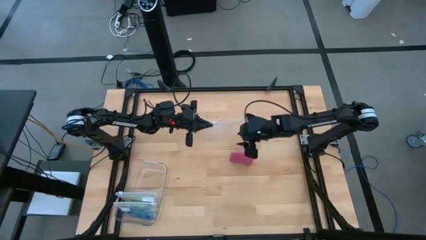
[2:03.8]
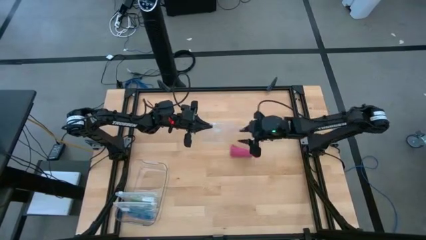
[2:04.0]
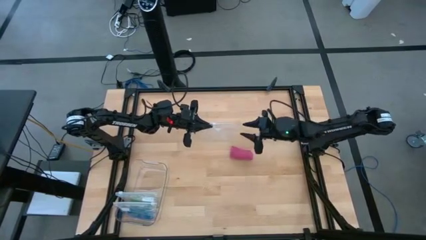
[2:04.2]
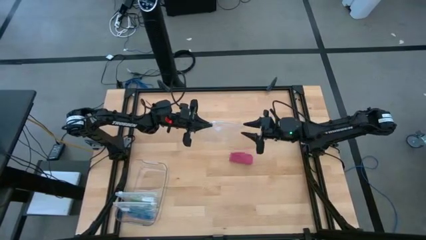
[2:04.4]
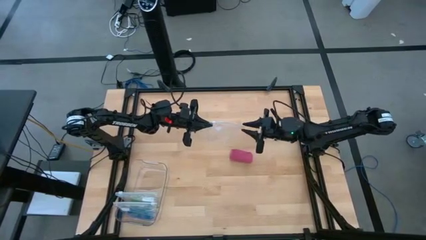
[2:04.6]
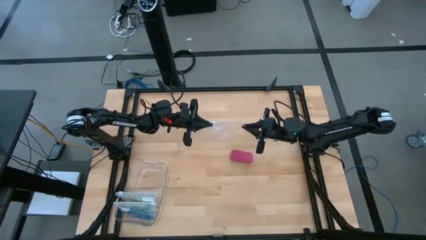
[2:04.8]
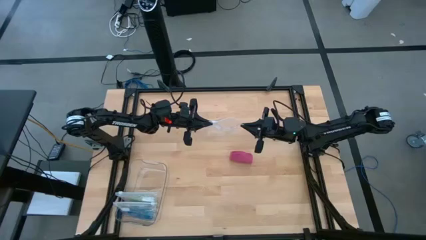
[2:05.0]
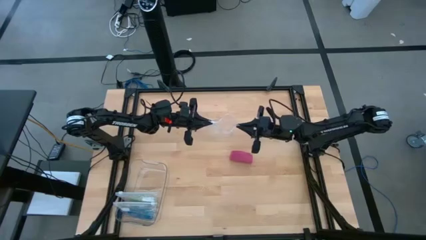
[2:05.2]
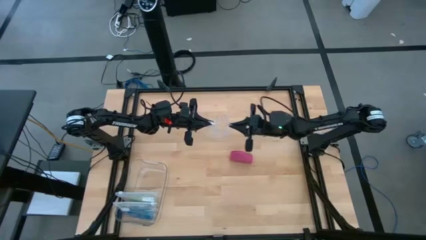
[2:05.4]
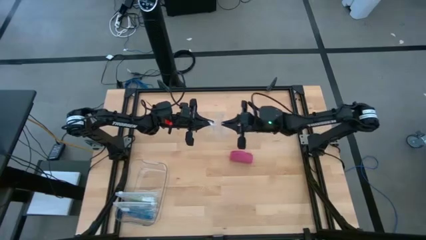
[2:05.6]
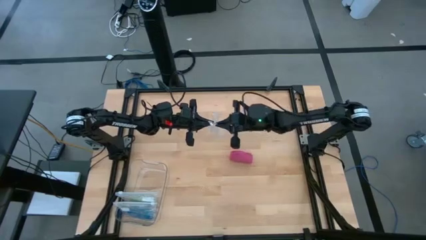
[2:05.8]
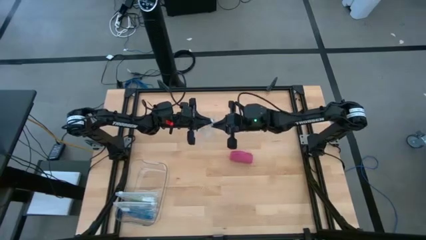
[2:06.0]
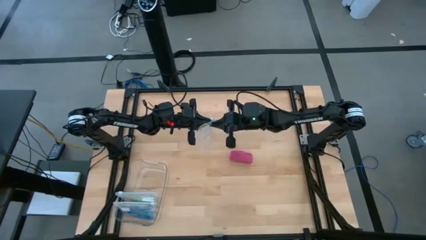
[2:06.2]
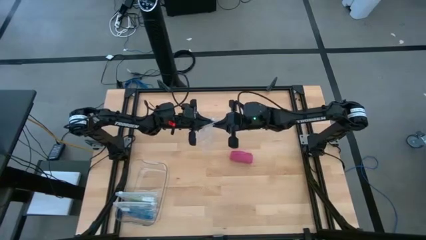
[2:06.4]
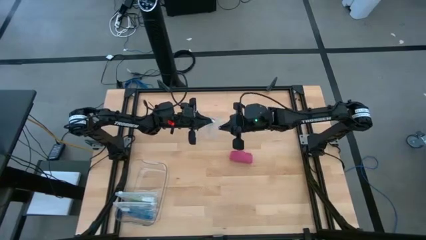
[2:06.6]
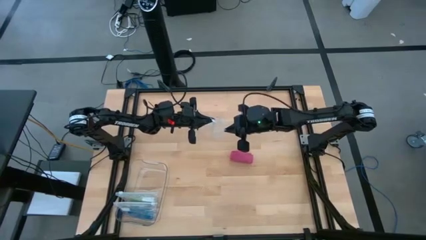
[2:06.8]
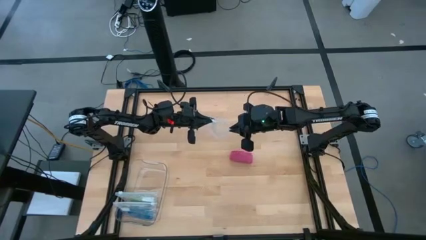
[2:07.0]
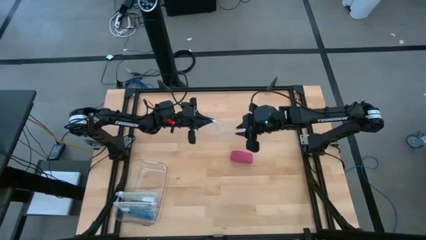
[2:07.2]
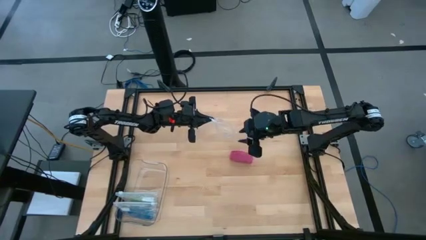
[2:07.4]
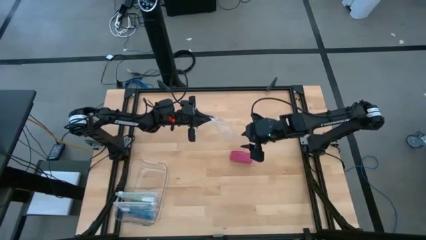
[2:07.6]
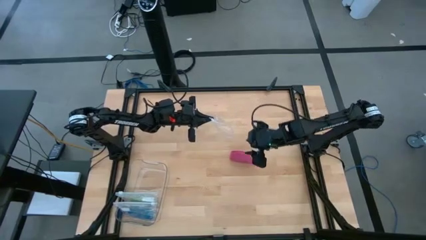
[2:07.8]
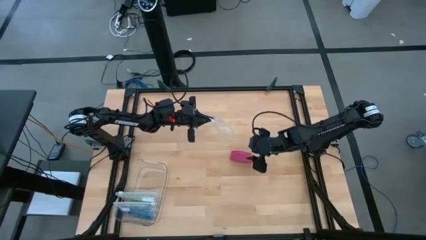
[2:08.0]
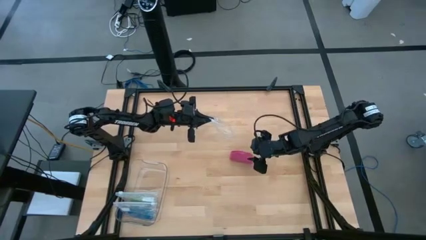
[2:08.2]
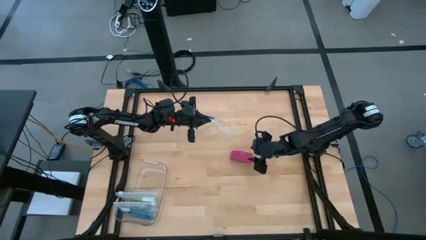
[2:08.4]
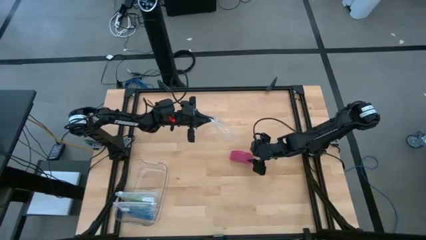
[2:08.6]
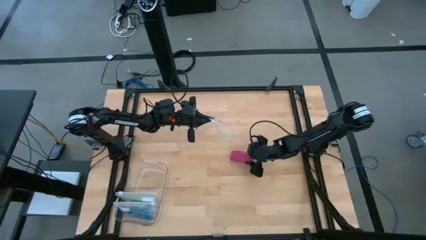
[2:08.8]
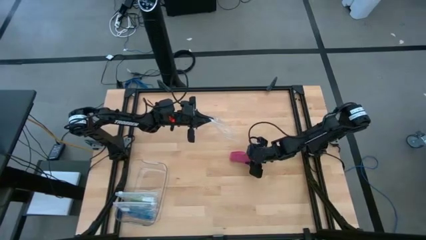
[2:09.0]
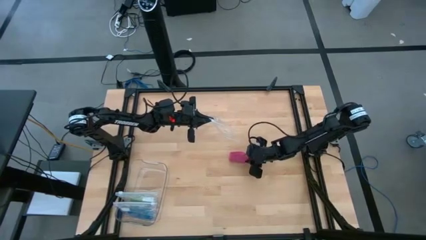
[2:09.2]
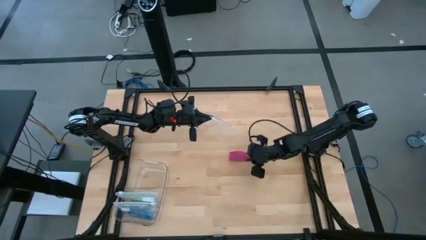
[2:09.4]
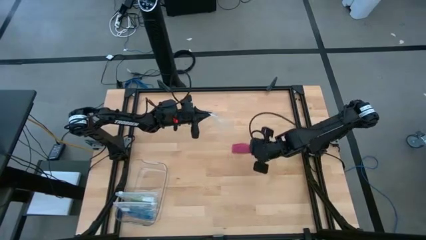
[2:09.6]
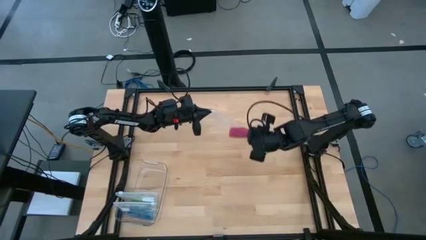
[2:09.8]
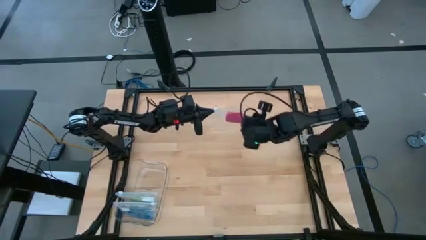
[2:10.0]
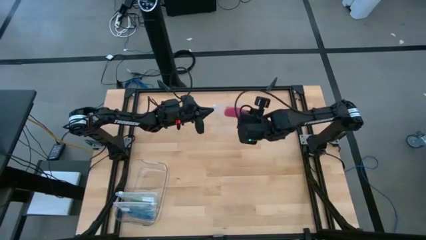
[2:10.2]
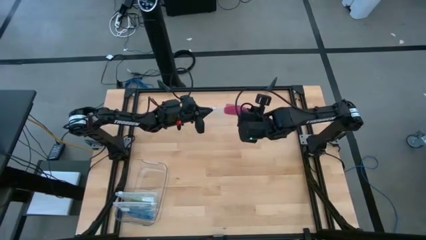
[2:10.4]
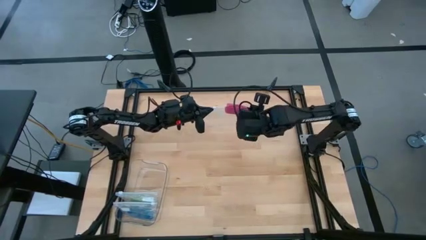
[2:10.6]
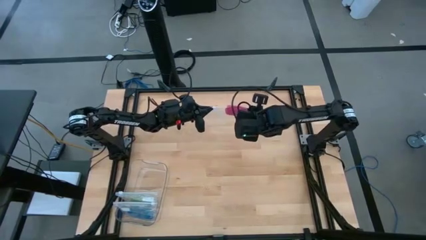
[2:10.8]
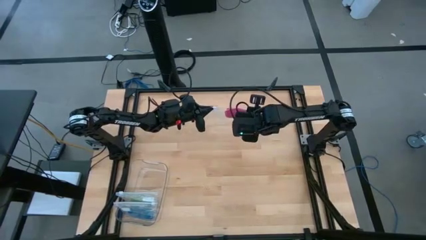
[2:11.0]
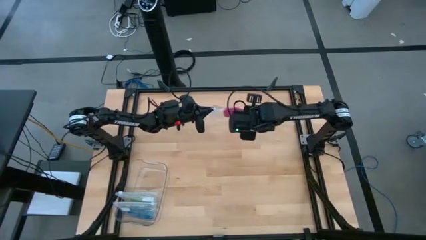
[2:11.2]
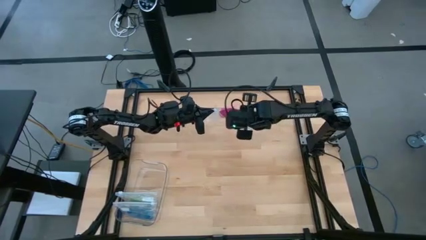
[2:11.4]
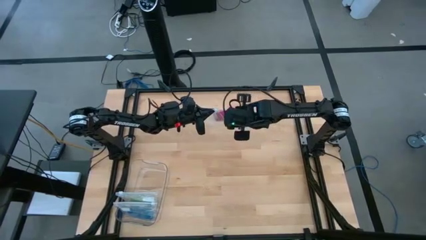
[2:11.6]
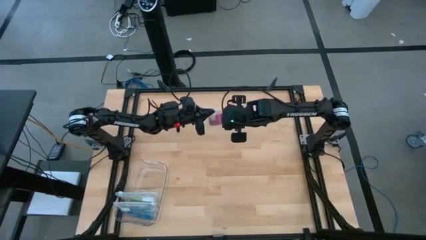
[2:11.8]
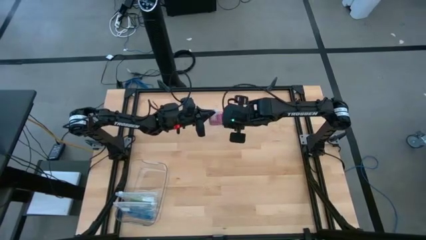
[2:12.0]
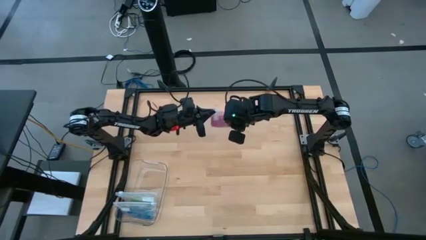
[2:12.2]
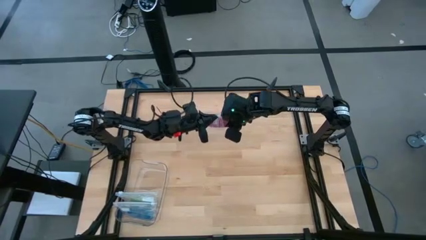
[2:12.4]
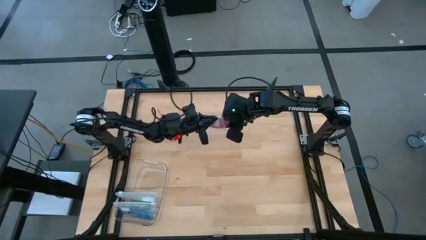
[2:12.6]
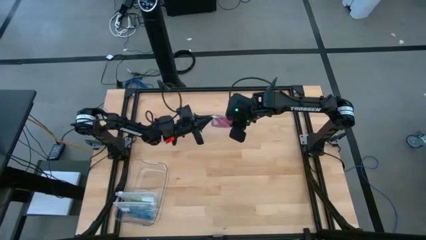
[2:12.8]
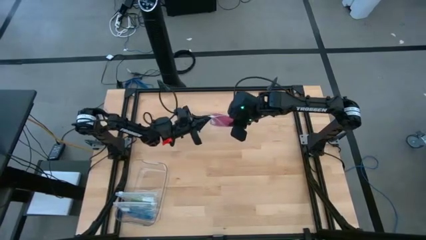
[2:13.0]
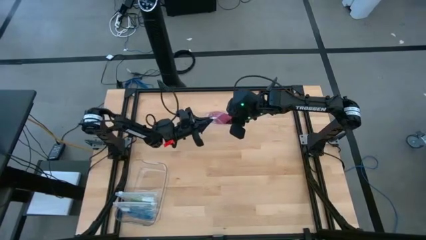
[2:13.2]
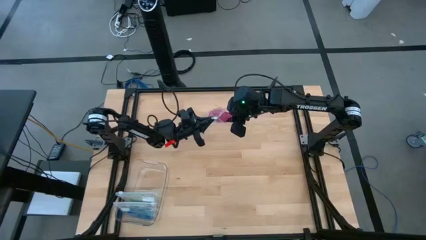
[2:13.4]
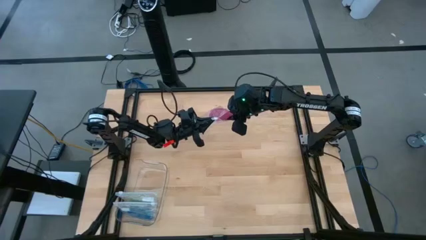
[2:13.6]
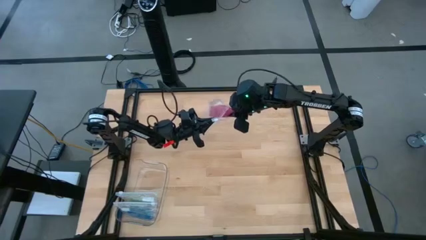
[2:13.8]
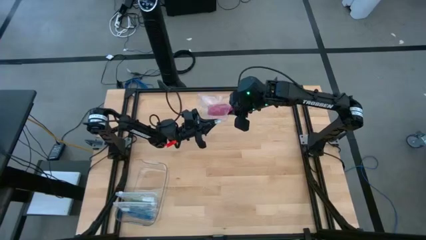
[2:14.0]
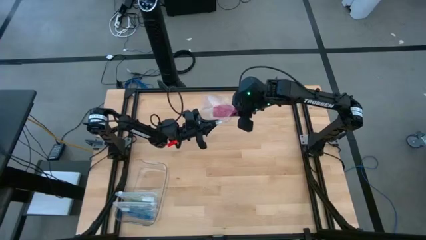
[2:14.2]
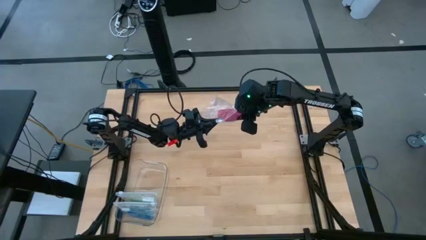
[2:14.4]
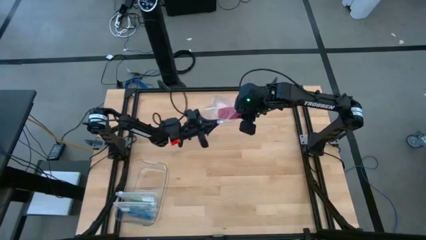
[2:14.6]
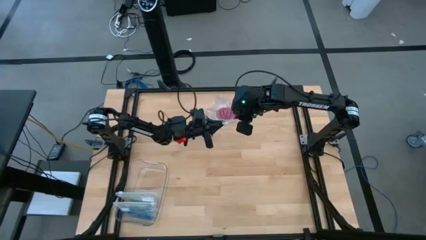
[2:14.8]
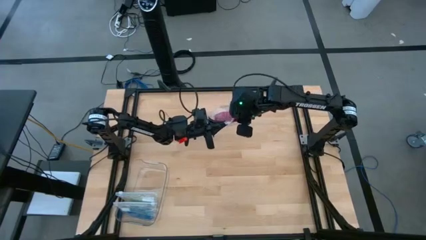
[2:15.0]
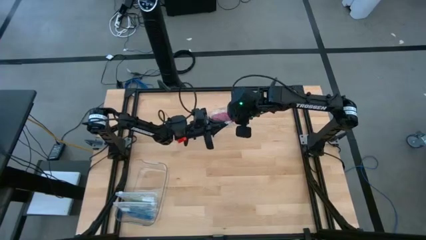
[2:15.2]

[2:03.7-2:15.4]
Task: Roll bandage
Put the rolled pink bandage into the transparent zip bag

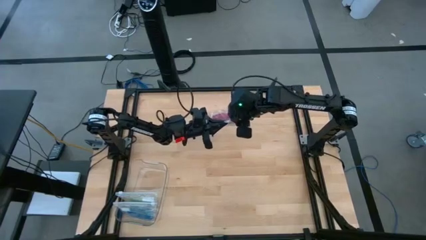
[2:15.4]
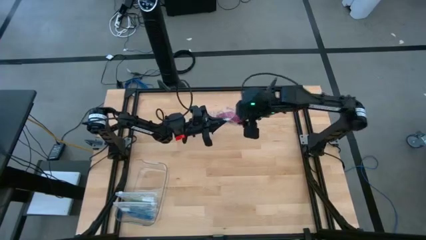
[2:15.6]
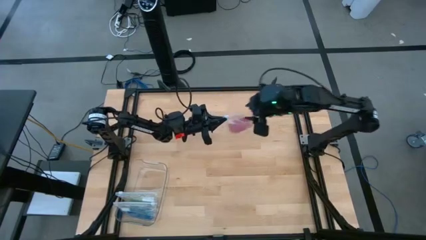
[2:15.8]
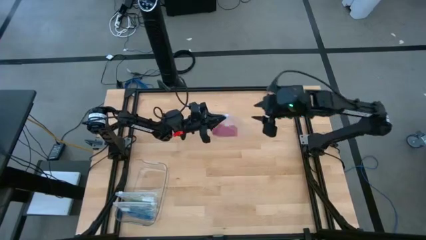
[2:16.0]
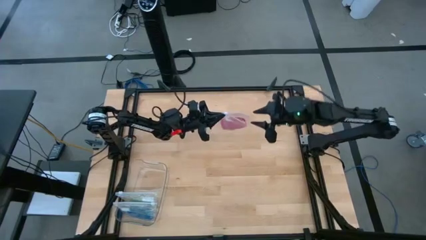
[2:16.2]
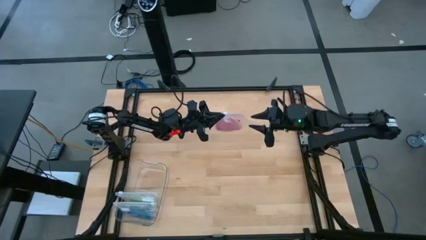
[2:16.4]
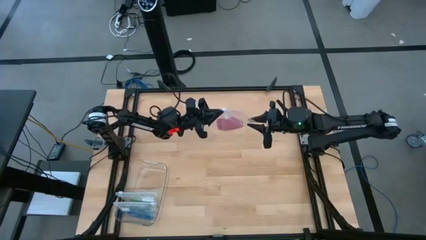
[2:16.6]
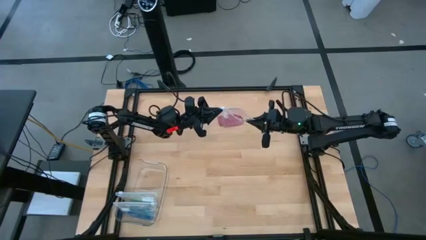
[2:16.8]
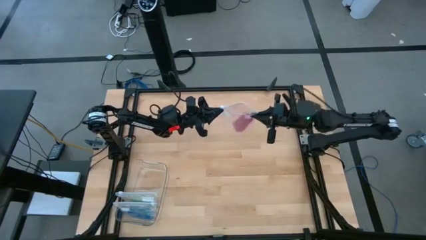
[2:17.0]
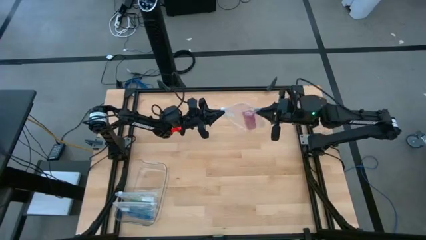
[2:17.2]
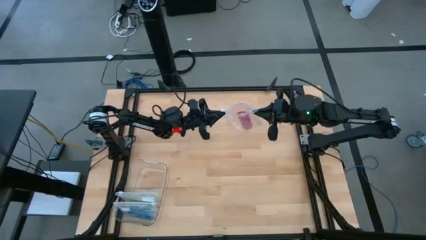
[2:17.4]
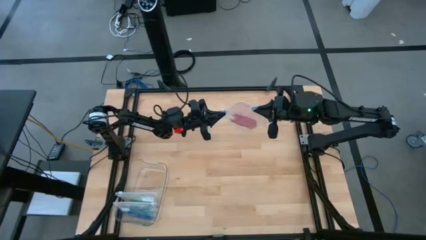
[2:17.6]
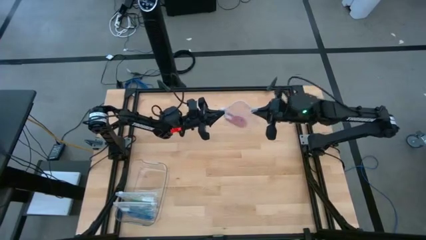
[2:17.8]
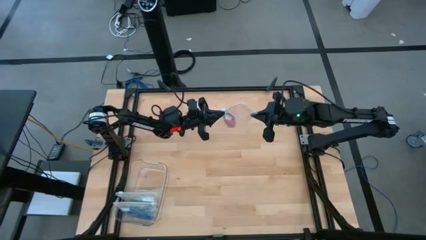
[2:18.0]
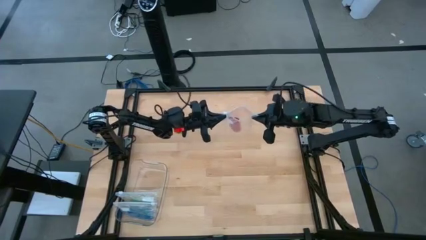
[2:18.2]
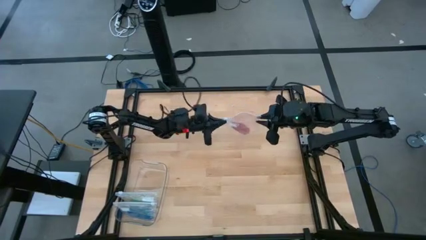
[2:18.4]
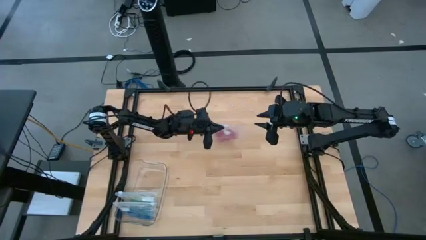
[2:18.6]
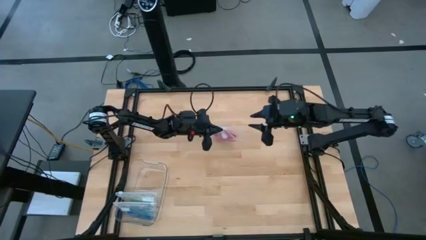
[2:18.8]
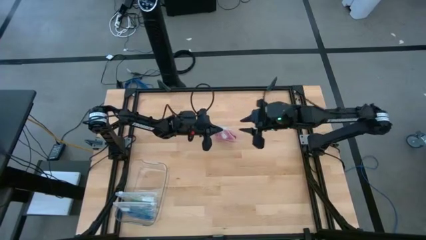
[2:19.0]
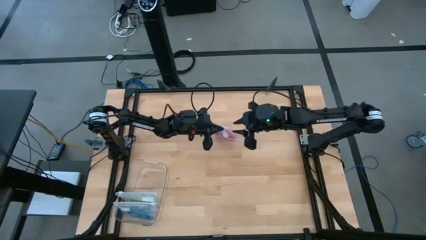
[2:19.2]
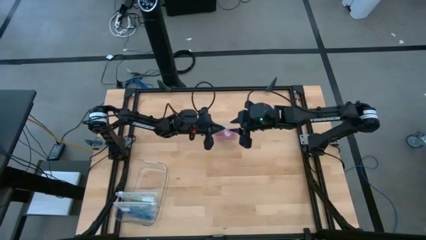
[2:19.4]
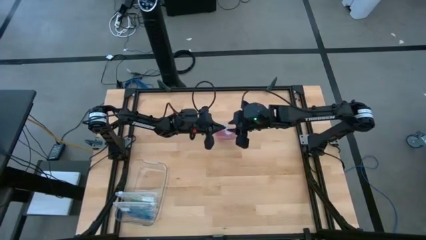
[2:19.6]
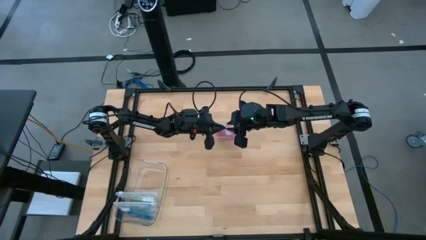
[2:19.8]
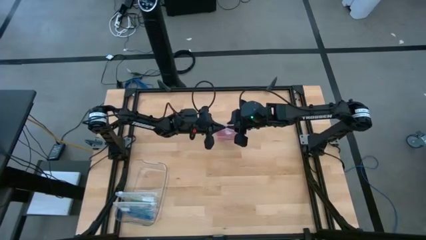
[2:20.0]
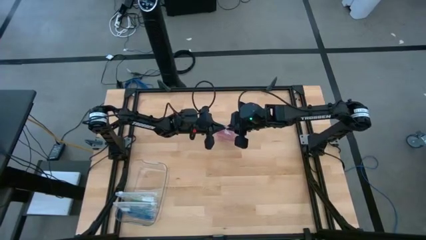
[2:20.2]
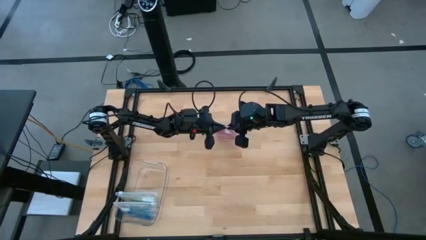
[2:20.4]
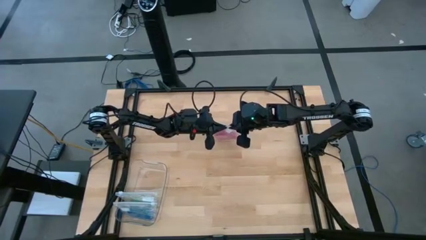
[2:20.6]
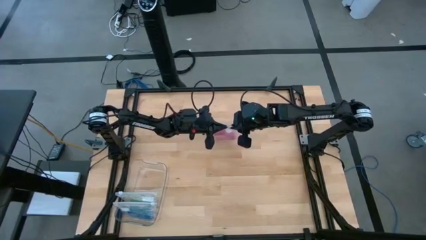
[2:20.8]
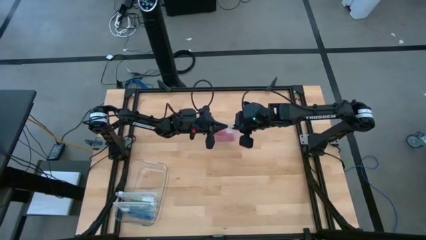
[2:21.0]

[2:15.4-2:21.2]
Close the transparent zip bag
